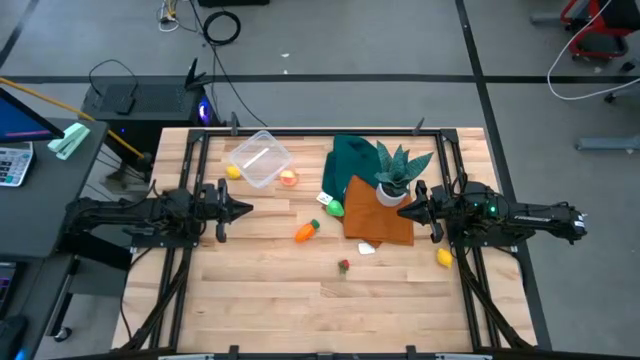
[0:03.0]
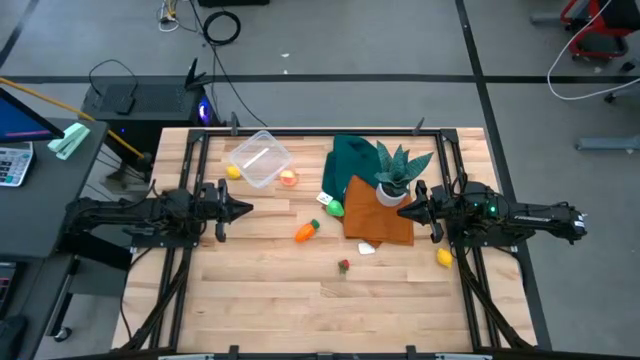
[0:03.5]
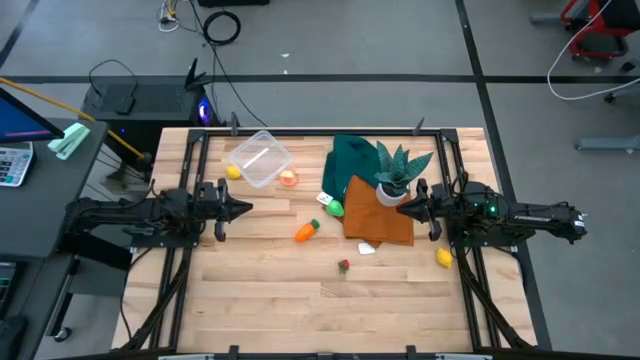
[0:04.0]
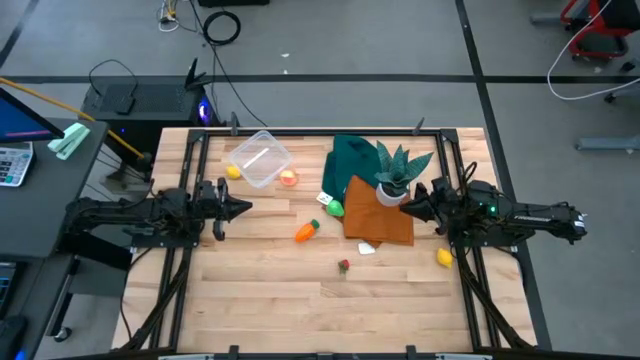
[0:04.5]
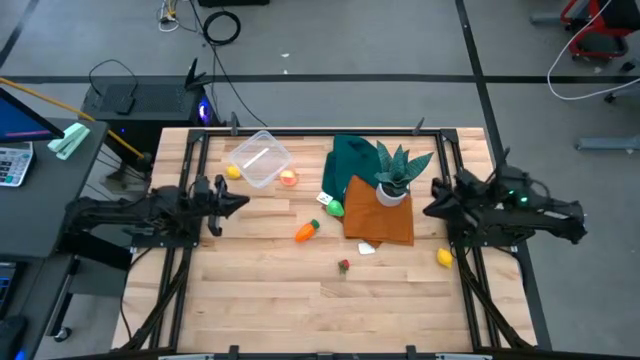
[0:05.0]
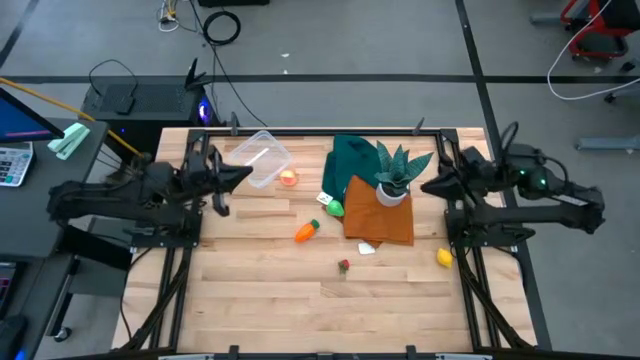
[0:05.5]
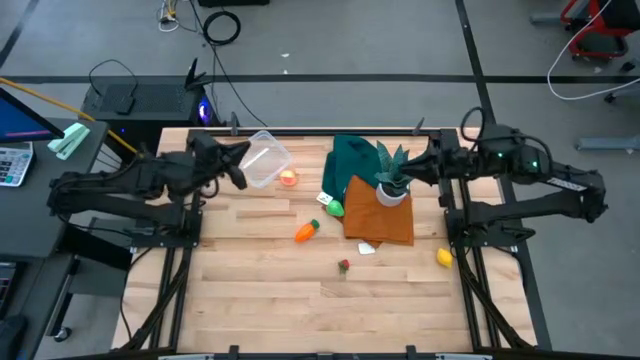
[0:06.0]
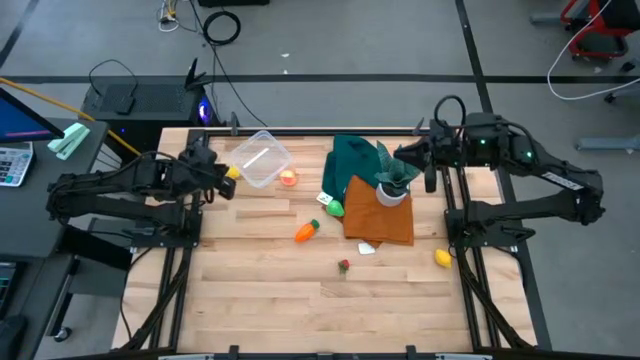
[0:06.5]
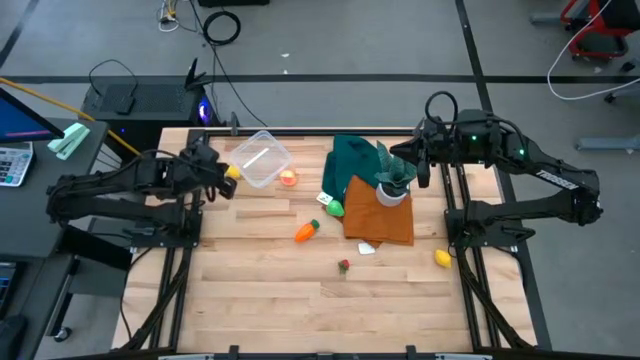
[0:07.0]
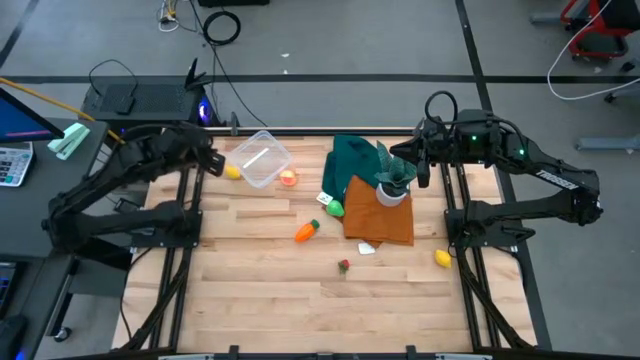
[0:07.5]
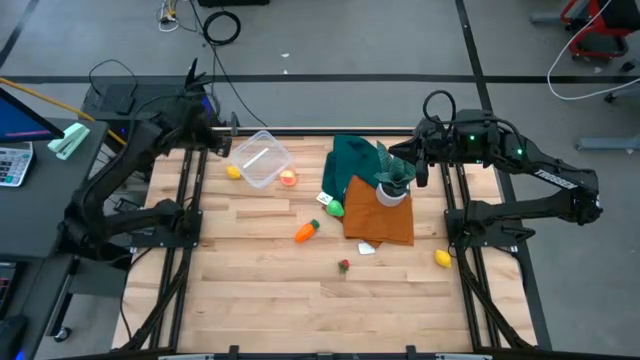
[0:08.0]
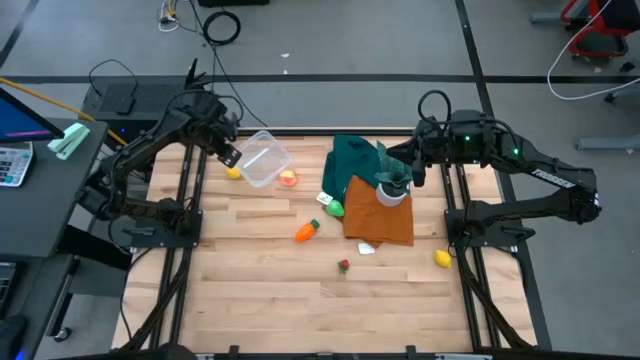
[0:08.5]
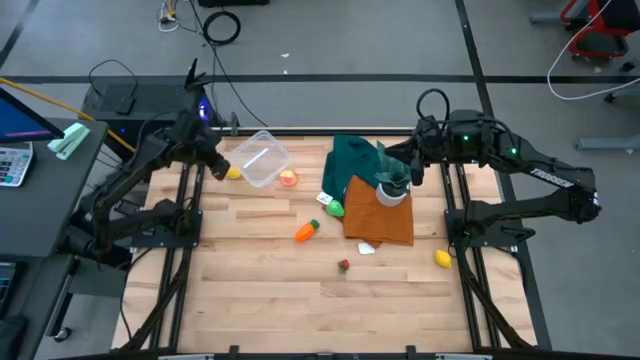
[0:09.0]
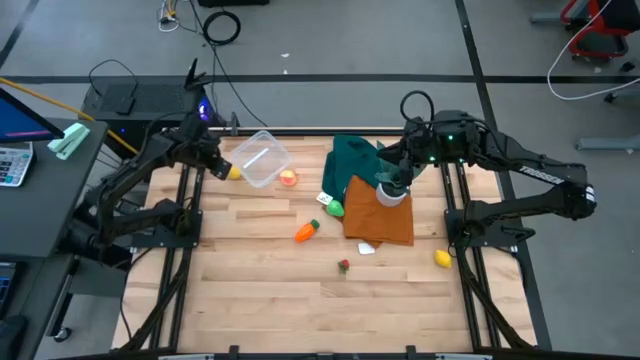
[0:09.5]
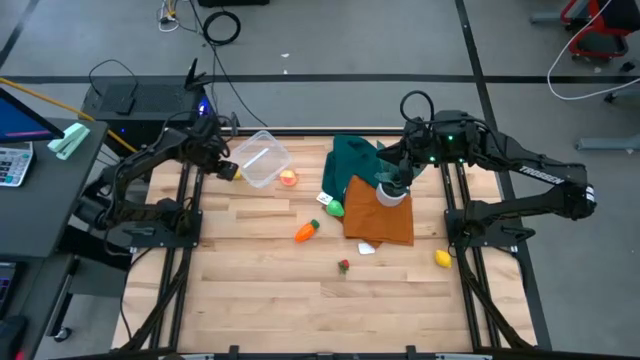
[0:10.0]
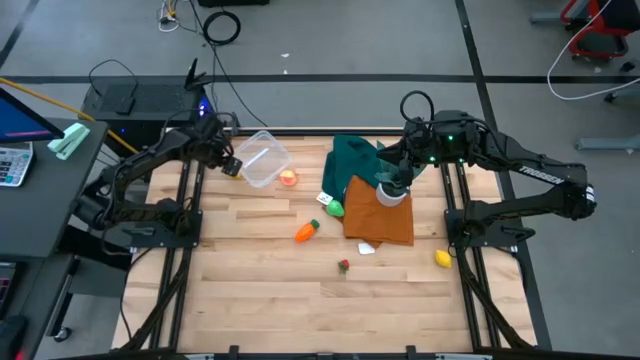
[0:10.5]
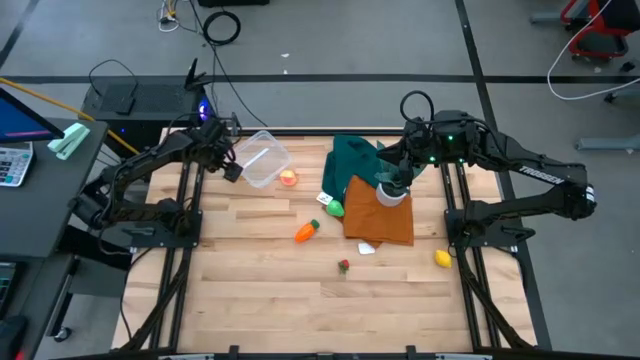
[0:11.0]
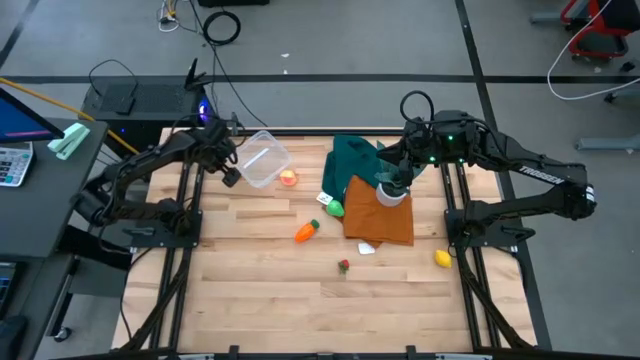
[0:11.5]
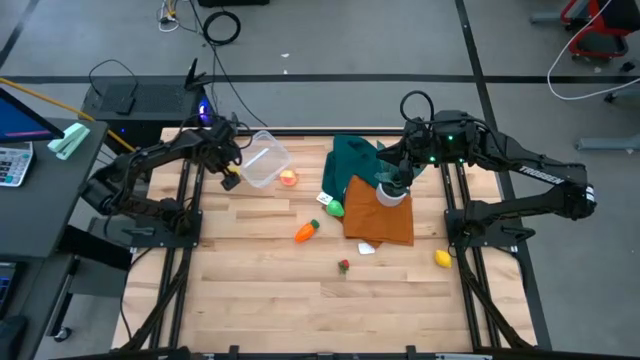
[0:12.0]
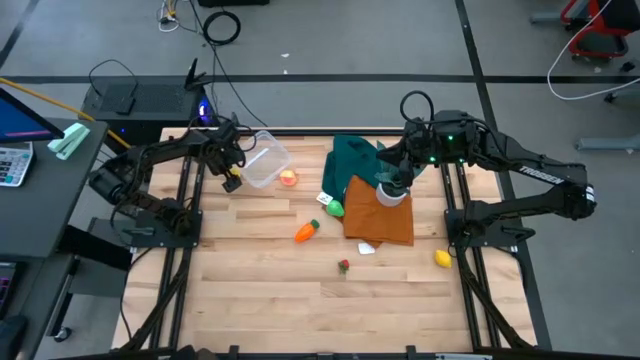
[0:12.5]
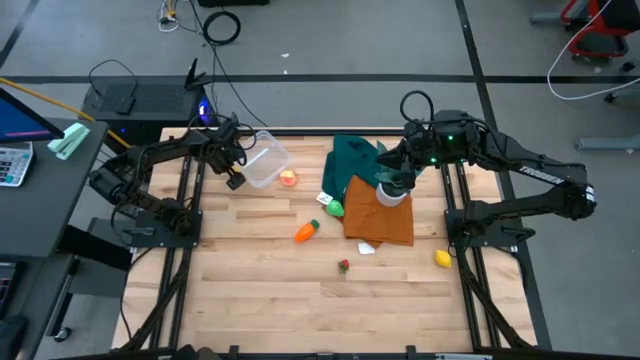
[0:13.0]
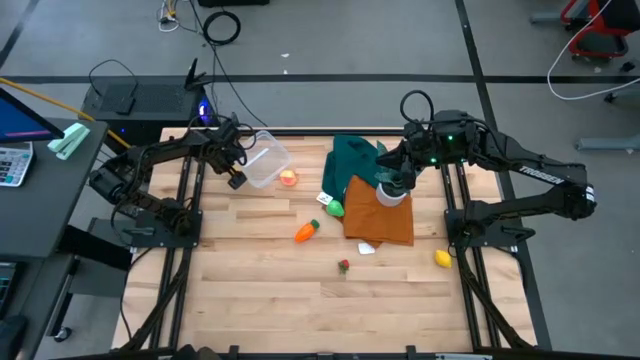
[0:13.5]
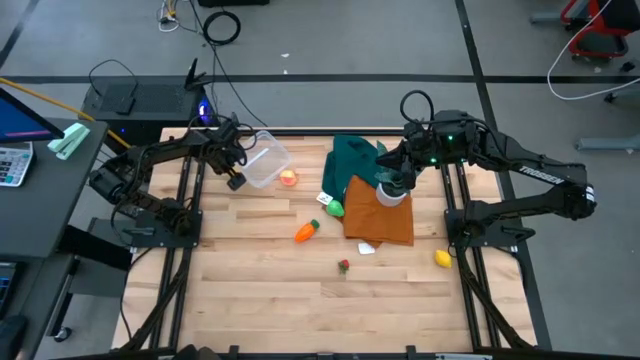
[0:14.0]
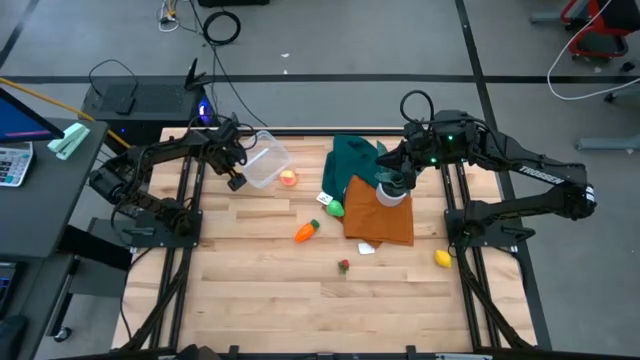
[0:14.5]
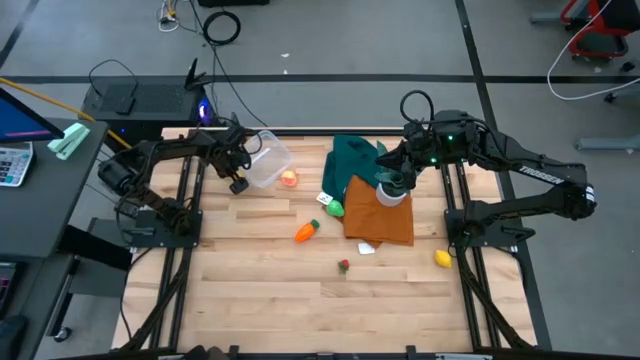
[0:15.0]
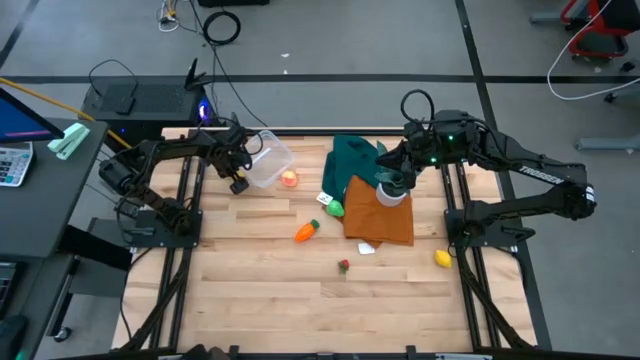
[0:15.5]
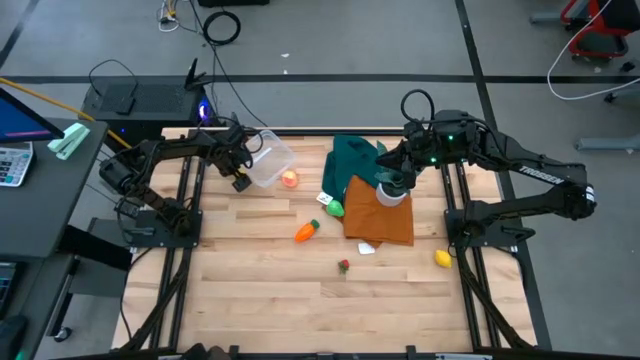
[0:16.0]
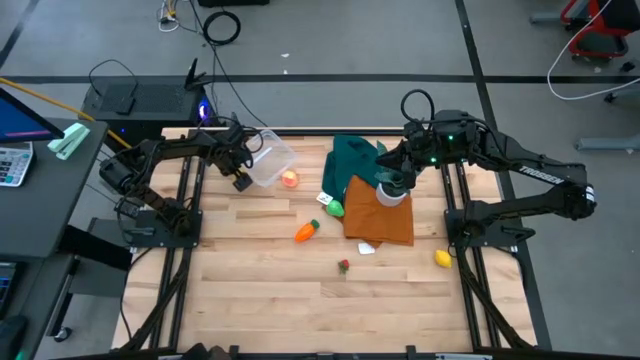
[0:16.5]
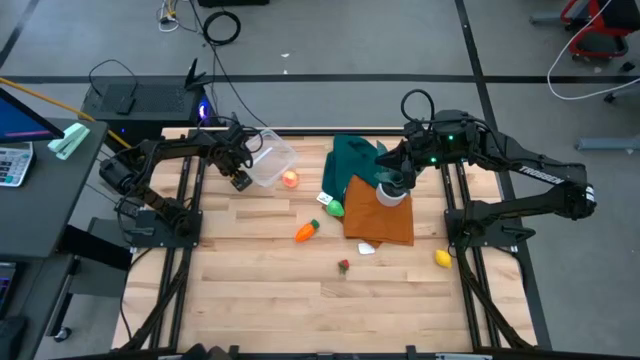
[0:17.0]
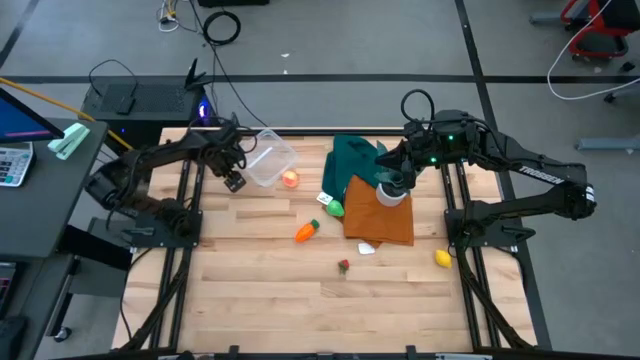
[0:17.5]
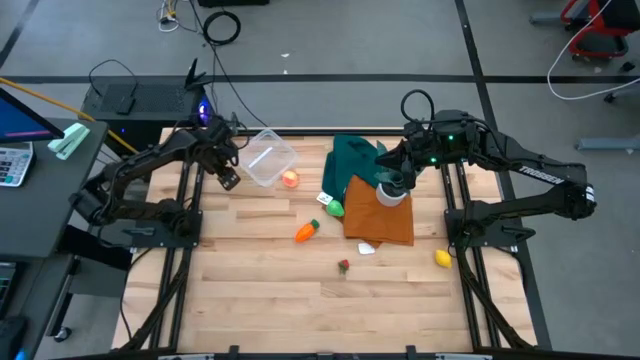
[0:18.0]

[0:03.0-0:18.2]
Task: Pick and placing Produce into tupperware
Put the top lemon into the transparent container

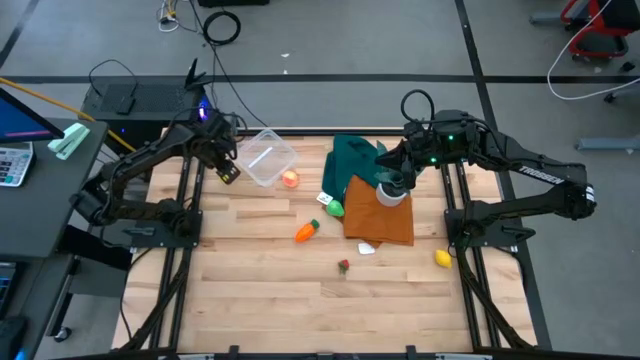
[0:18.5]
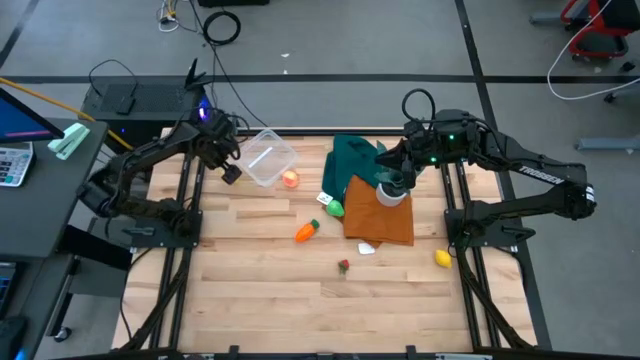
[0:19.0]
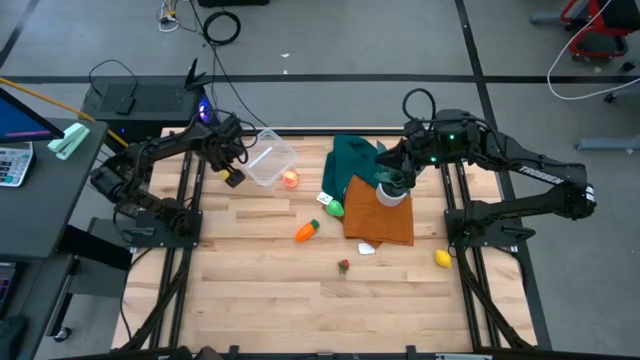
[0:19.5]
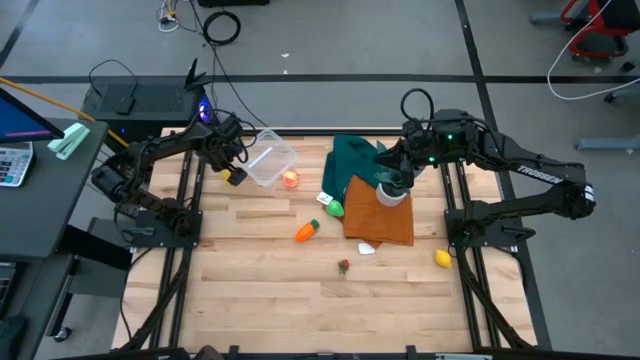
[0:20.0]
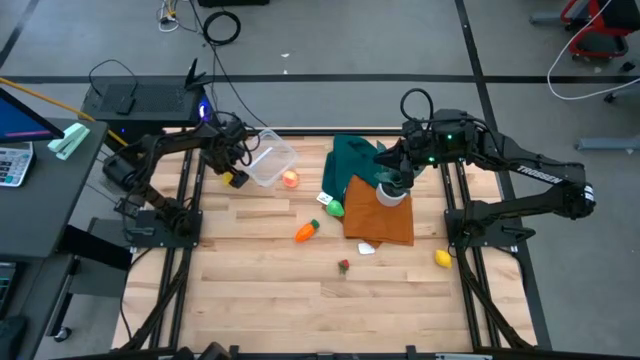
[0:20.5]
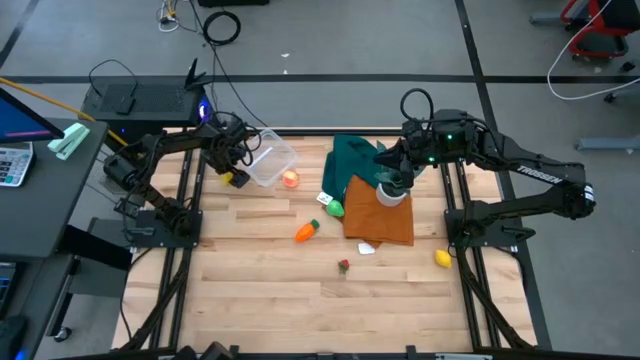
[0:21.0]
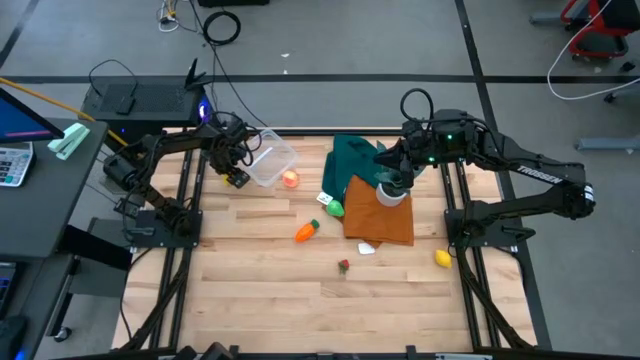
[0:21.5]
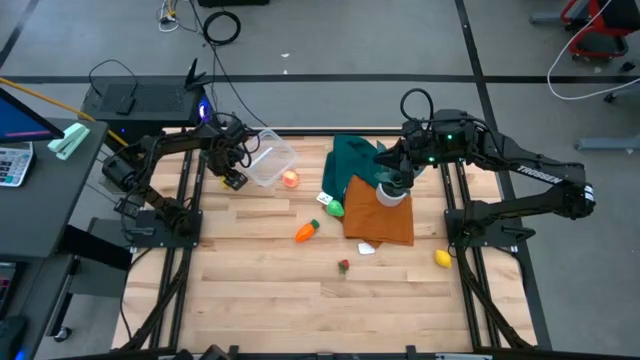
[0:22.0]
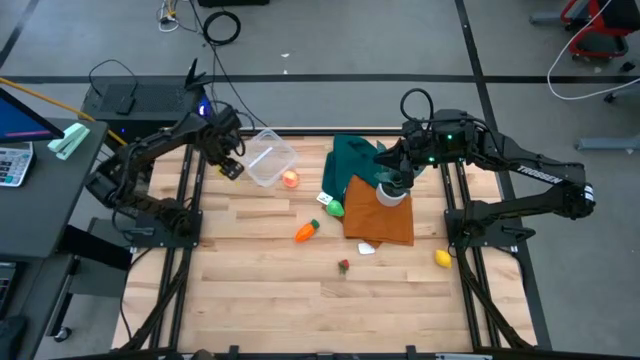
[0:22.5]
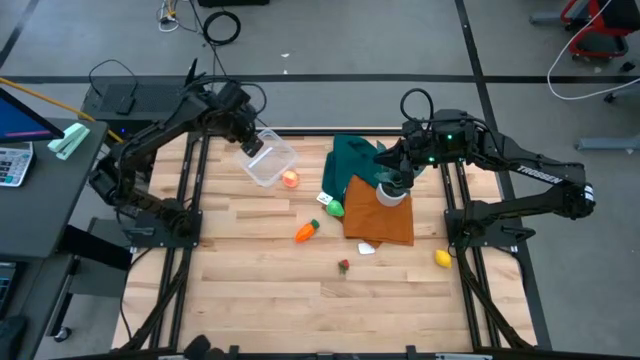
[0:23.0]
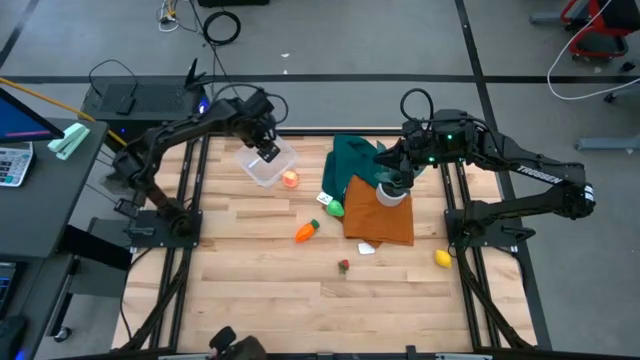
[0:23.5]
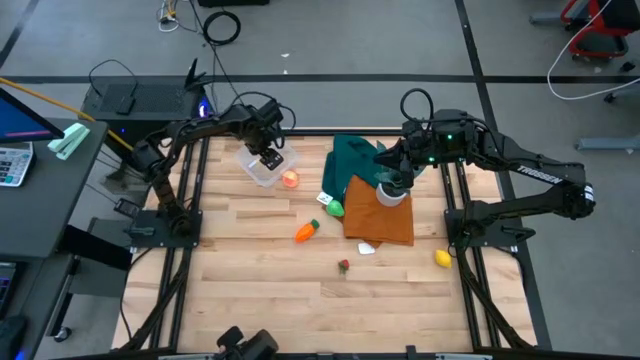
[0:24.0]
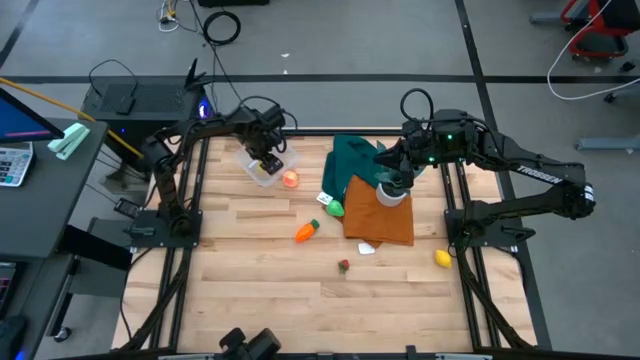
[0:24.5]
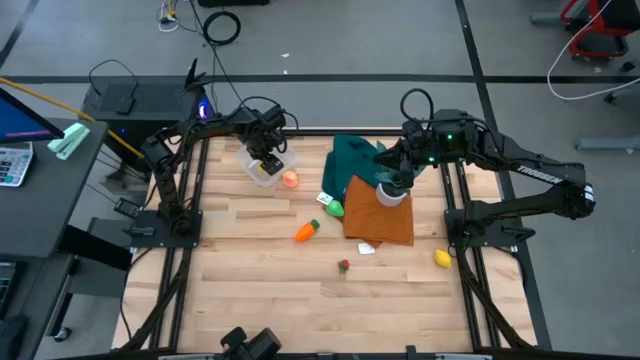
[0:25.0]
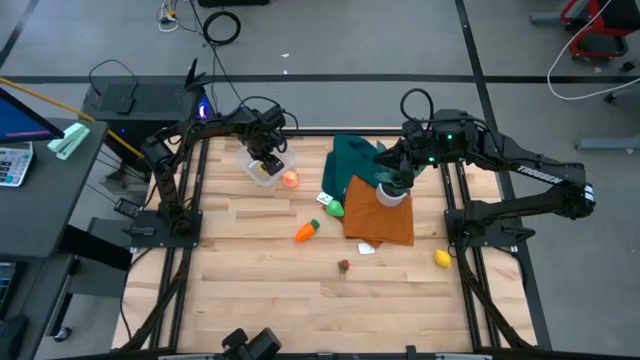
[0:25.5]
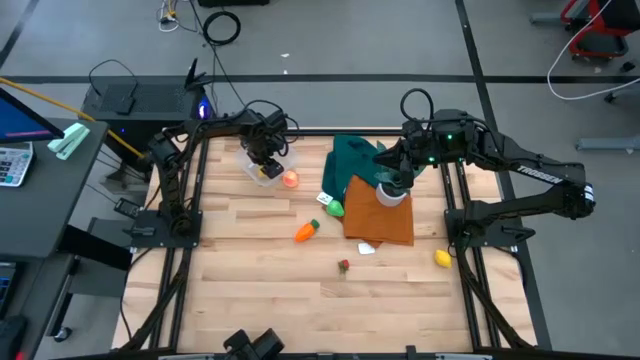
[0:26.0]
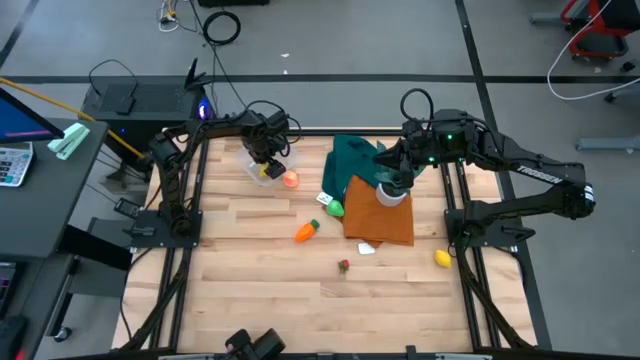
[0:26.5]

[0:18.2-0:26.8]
Put the top lemon into the transparent container
